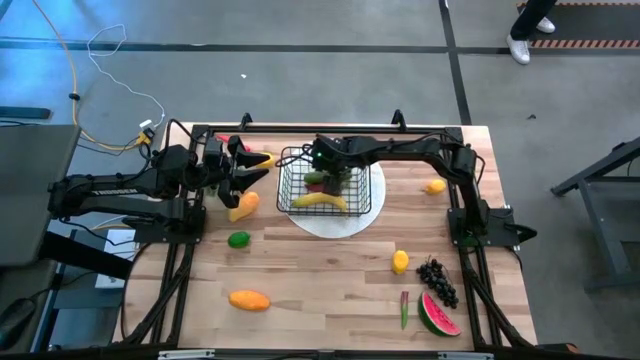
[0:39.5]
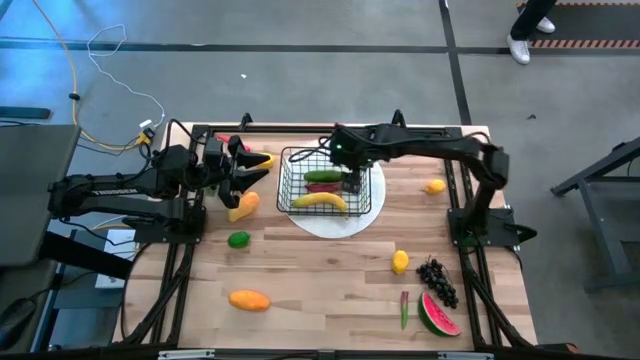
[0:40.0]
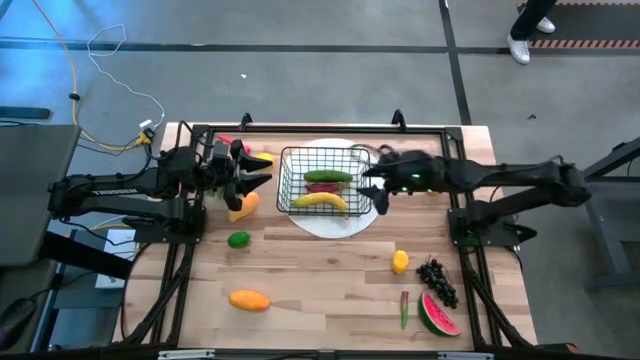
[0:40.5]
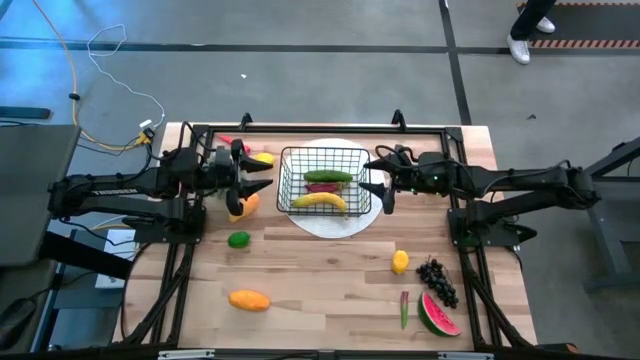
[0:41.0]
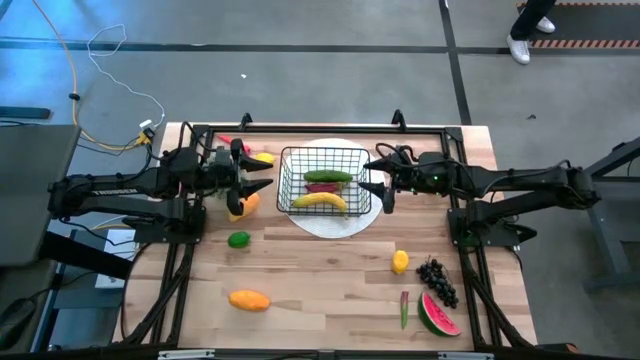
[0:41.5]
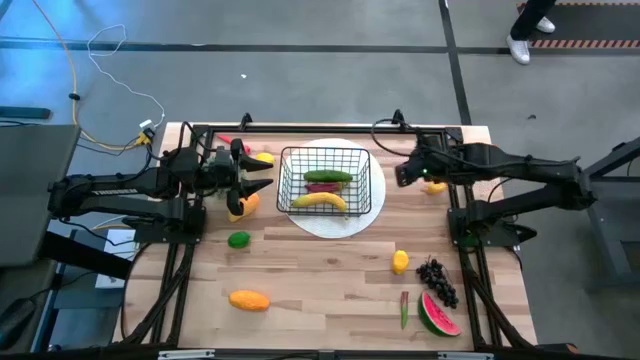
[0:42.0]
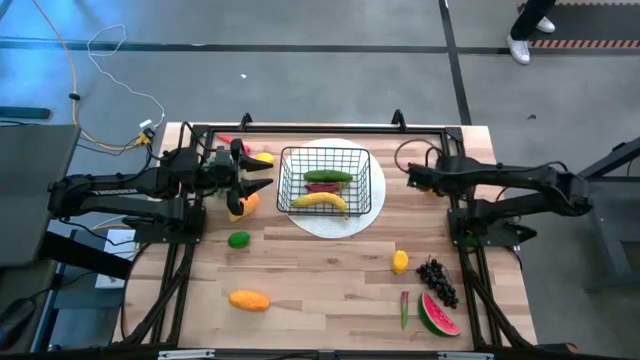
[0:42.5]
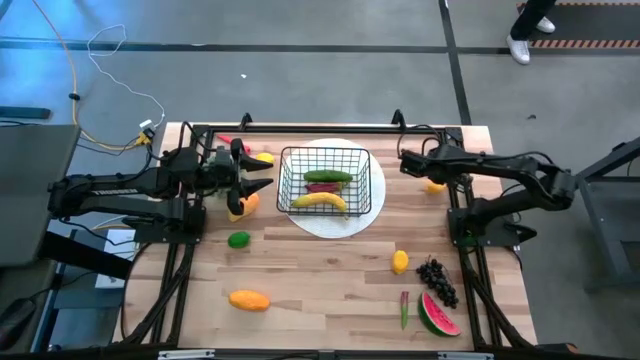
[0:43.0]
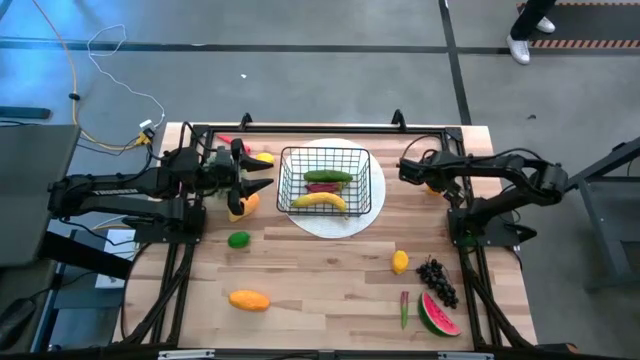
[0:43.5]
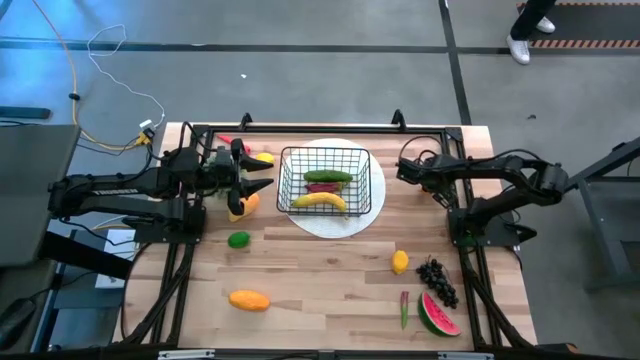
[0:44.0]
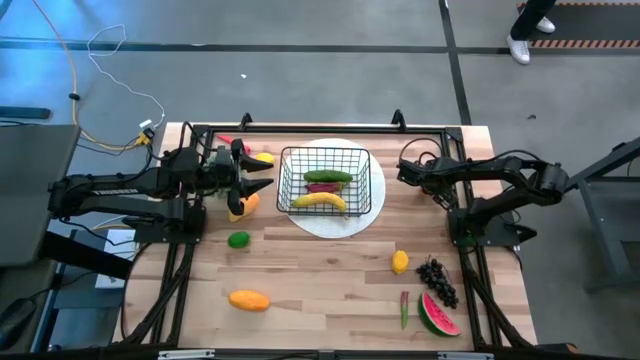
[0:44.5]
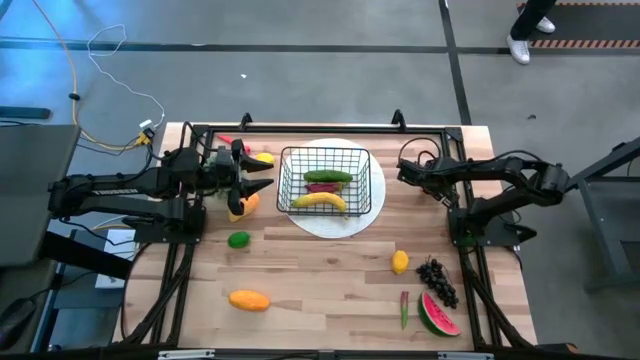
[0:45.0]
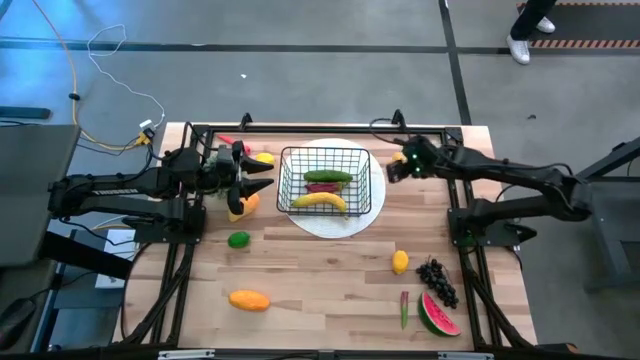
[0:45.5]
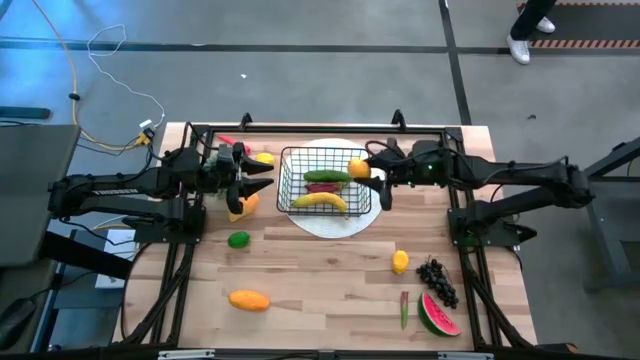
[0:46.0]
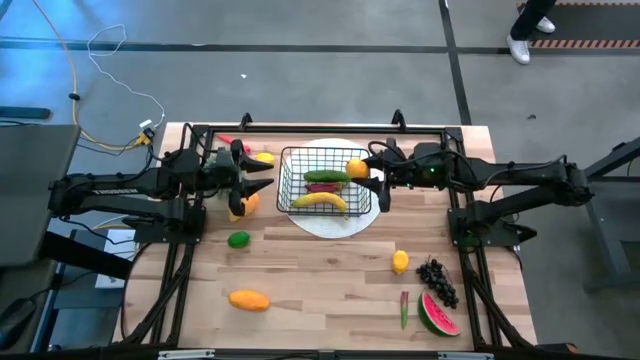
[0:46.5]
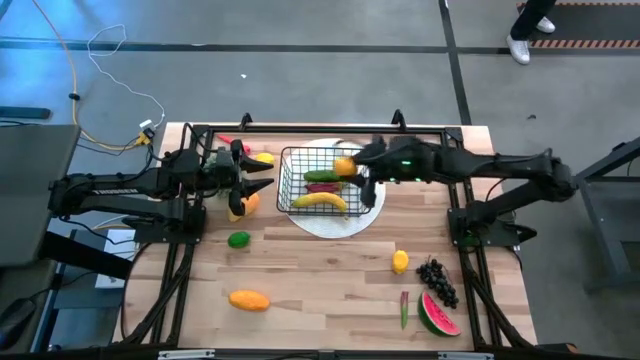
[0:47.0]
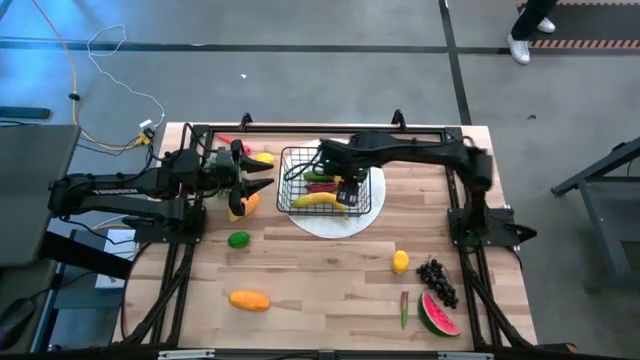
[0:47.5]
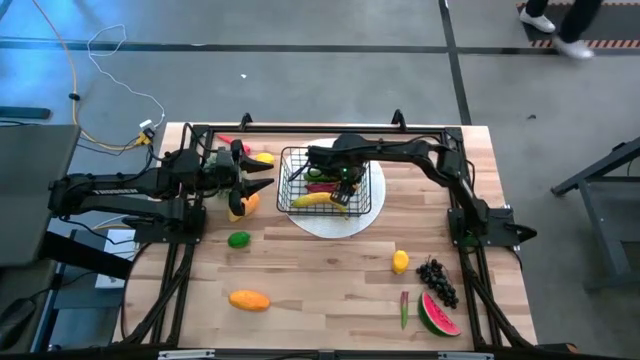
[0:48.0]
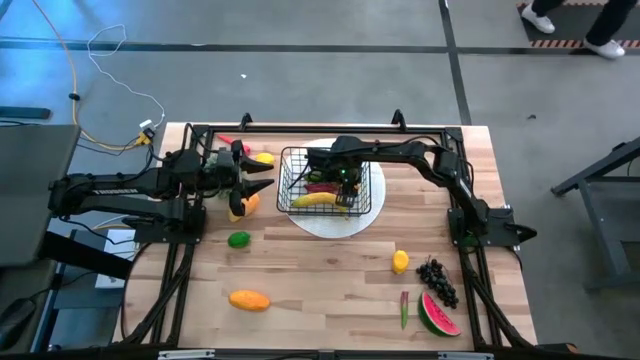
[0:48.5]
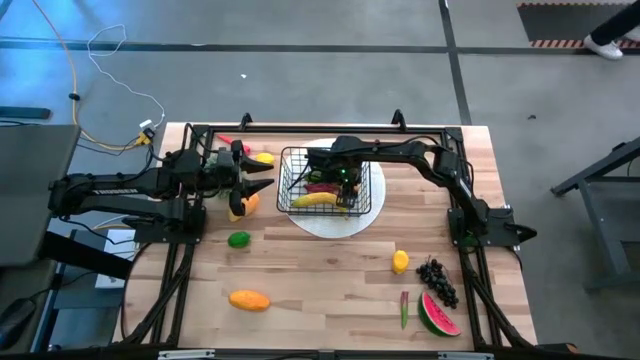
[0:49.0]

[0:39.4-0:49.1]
Task: Build produce basket
Put the top right yellow lemon into the wire basket

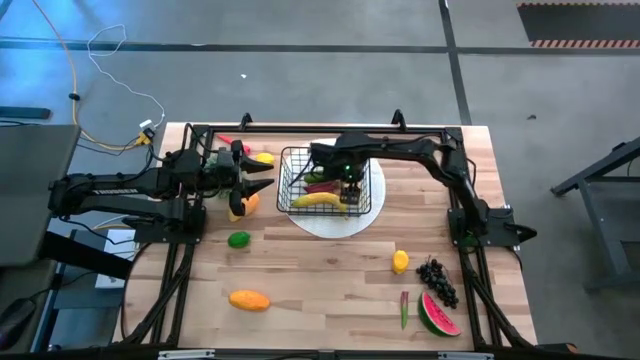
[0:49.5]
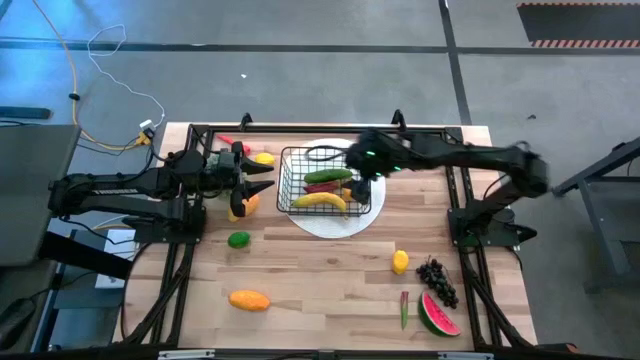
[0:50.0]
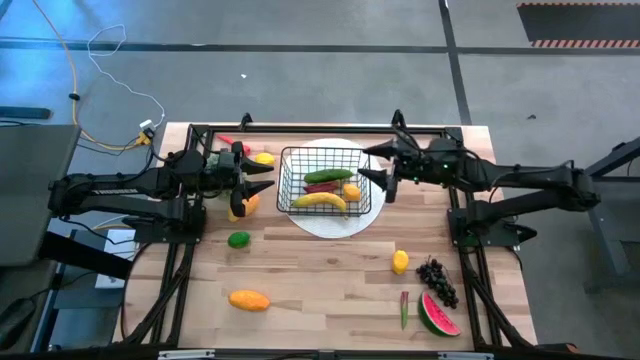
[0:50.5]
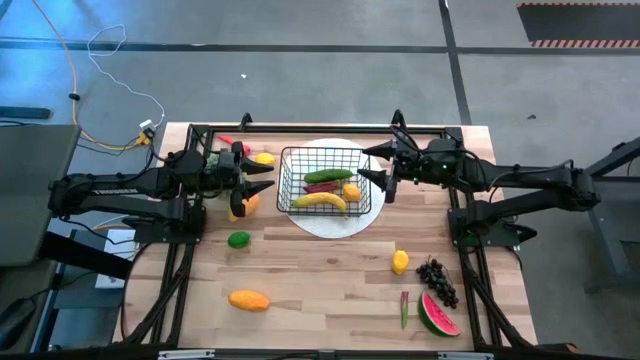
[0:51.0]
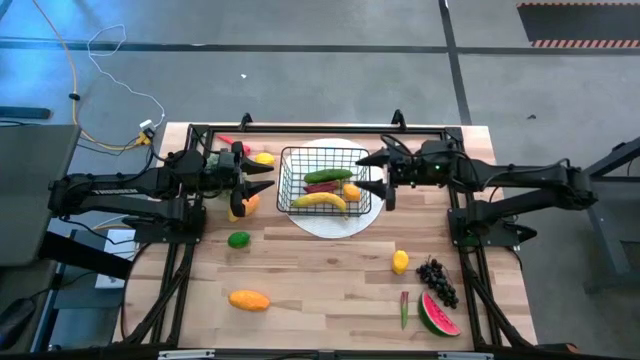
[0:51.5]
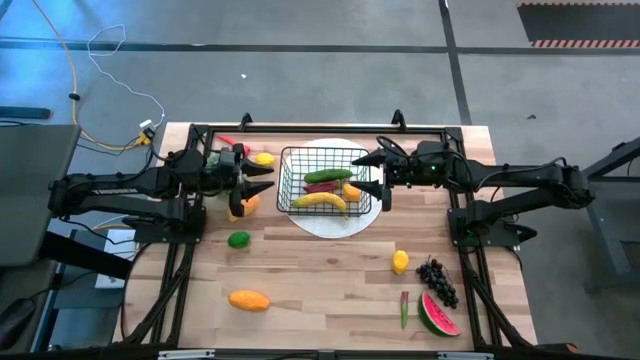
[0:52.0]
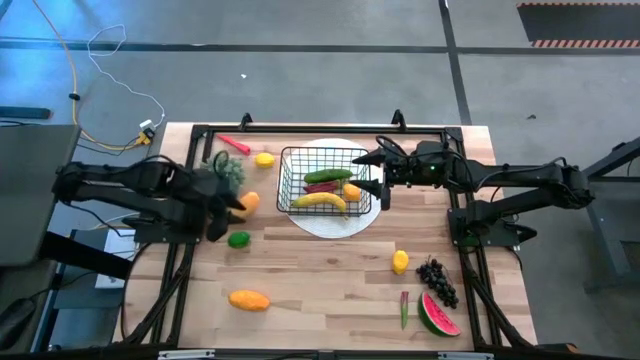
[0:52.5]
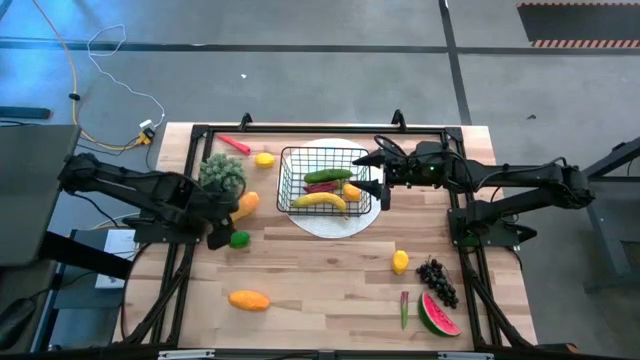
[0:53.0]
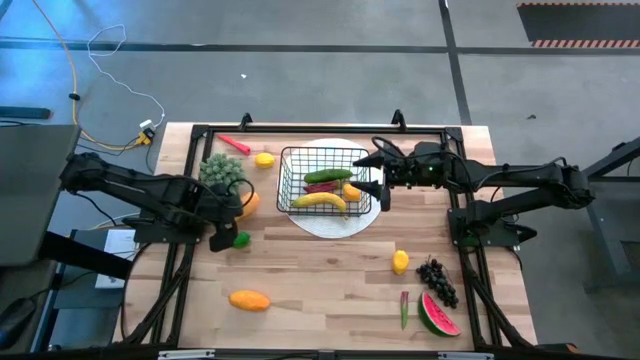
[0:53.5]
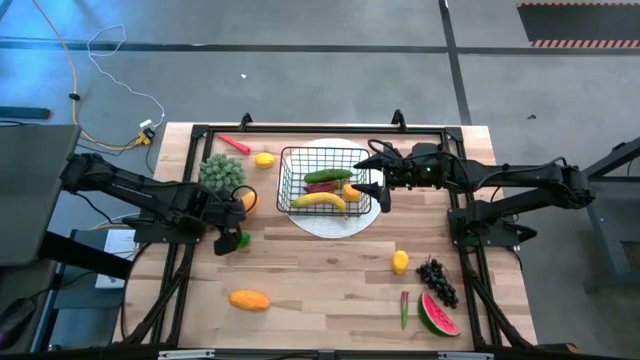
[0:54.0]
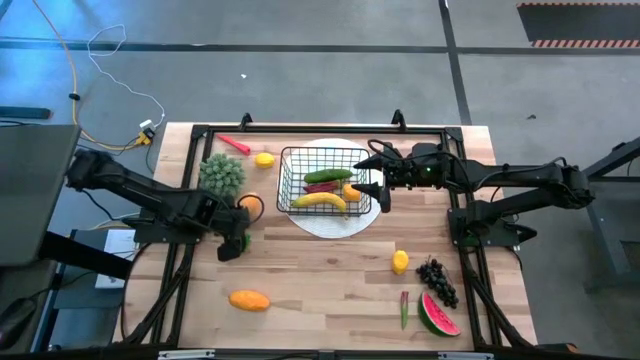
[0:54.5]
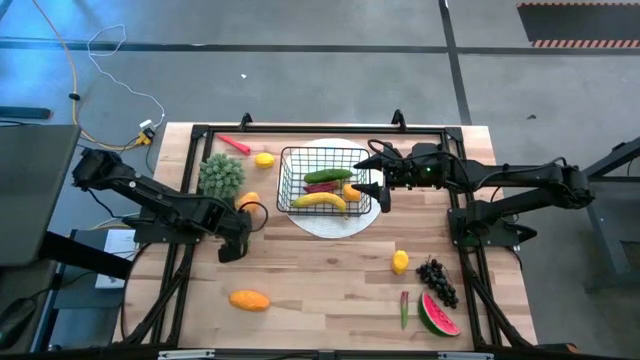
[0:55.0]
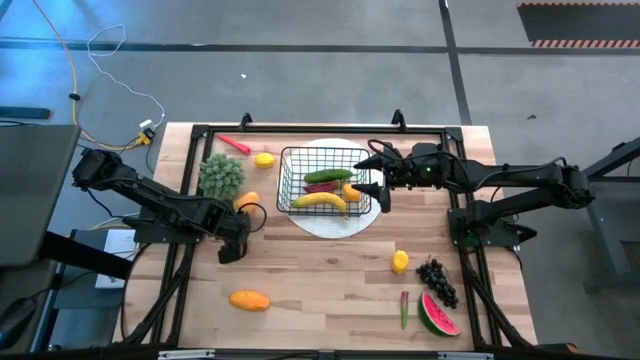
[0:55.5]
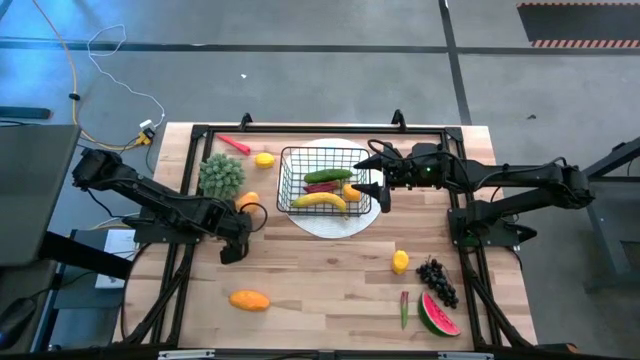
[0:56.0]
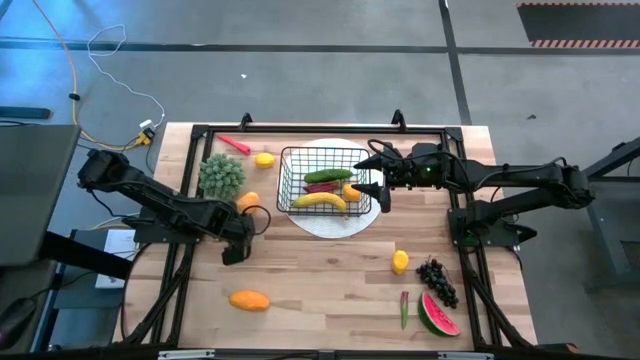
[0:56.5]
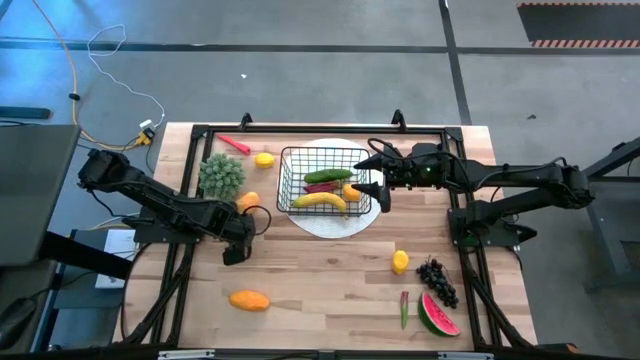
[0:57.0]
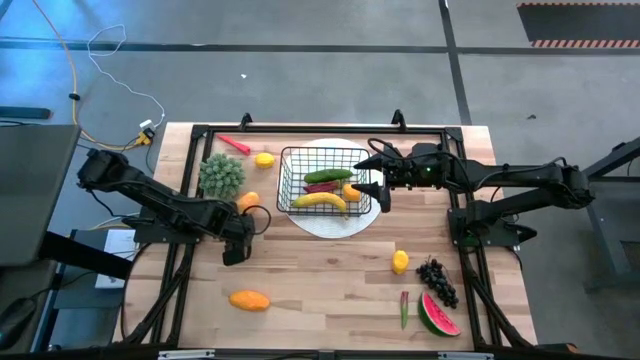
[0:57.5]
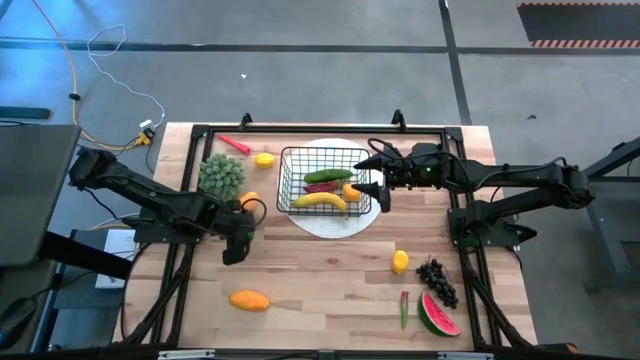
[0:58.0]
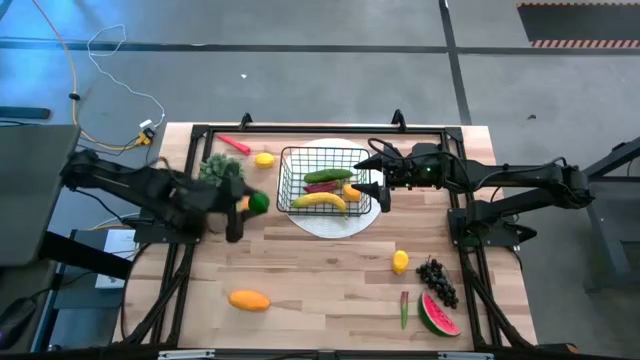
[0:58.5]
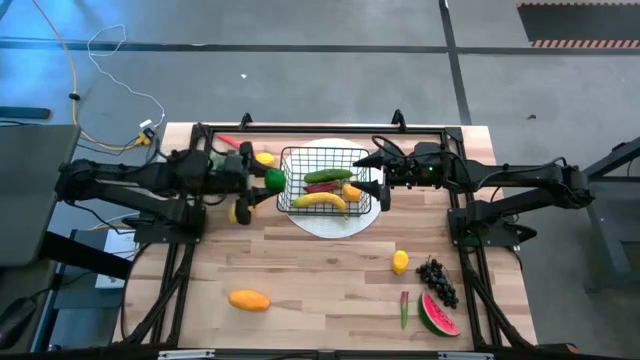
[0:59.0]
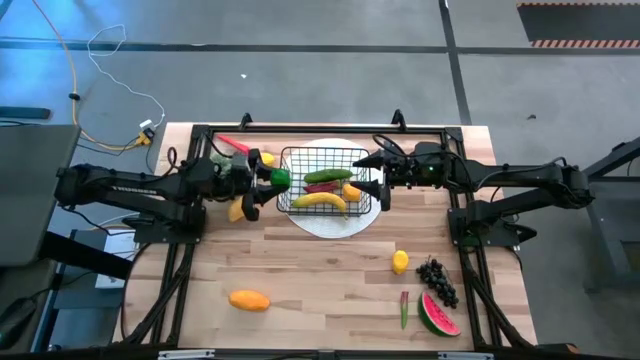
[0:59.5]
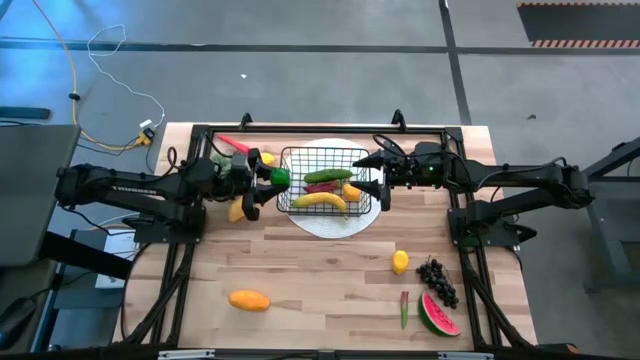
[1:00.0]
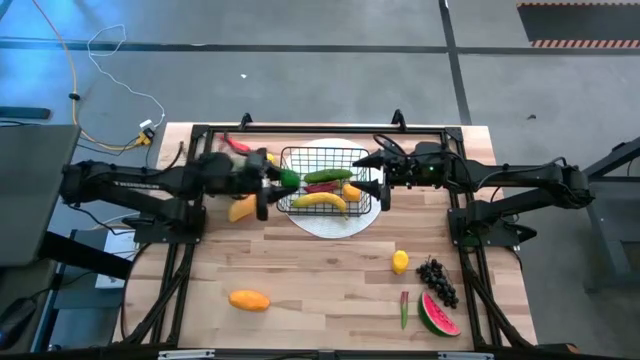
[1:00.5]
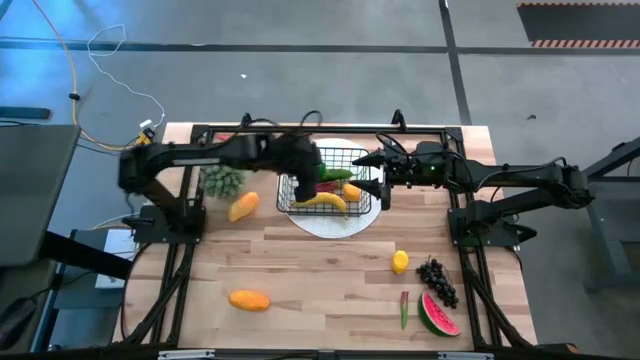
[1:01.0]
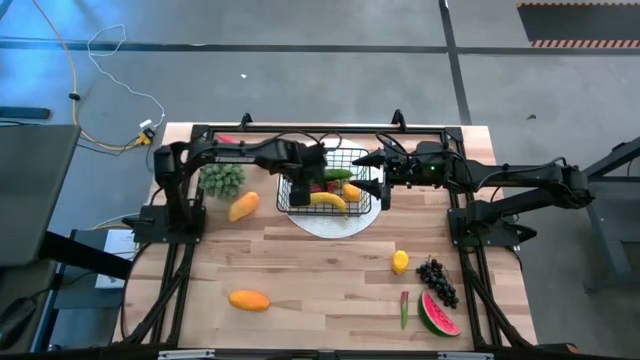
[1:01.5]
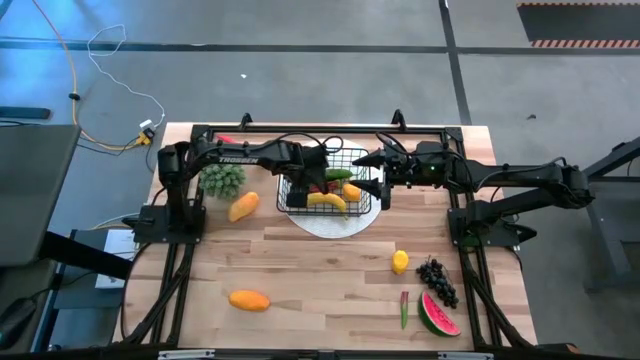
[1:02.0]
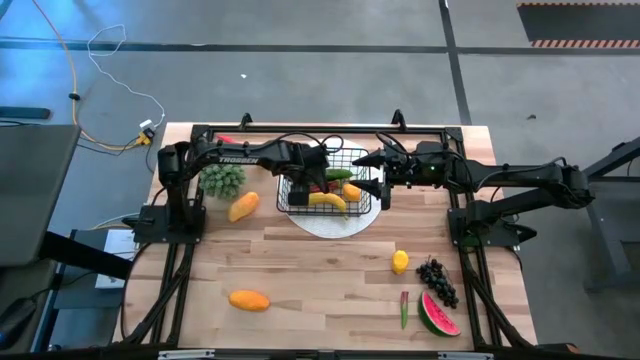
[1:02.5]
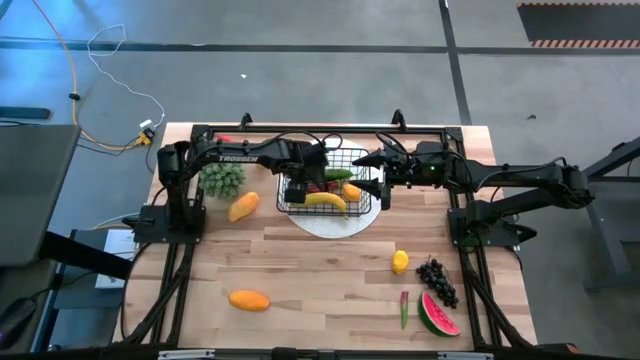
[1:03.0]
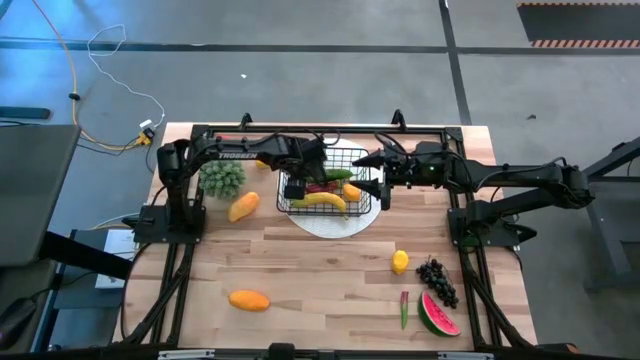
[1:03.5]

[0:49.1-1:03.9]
Put the green lime into the wire basket
